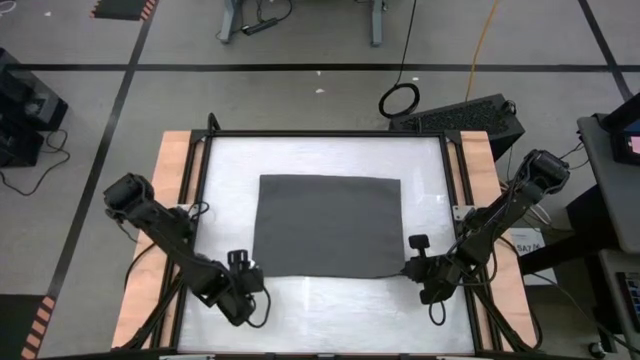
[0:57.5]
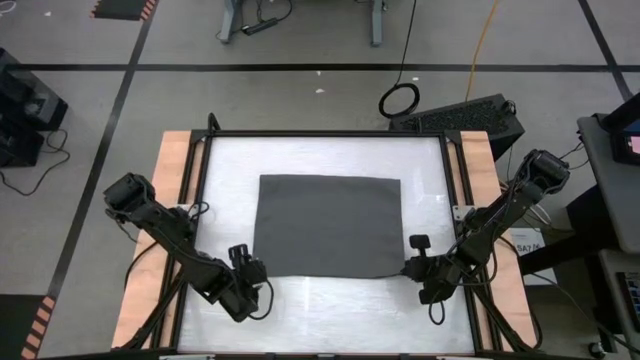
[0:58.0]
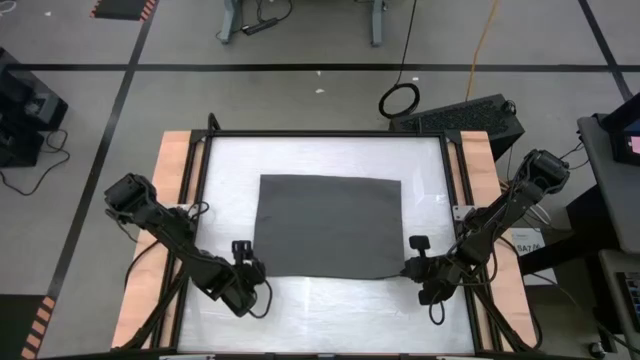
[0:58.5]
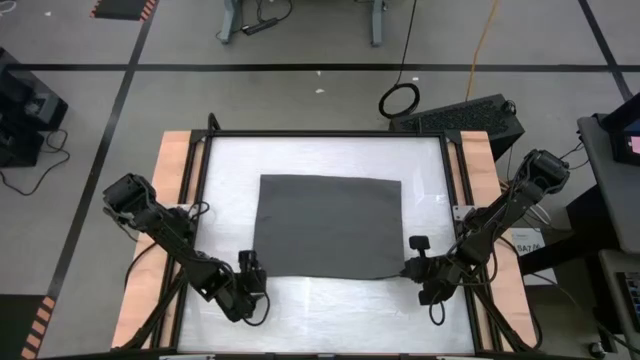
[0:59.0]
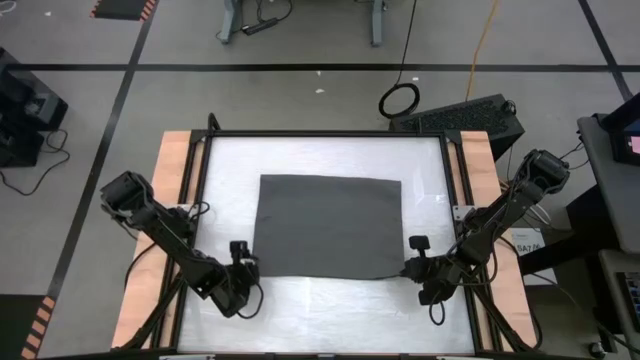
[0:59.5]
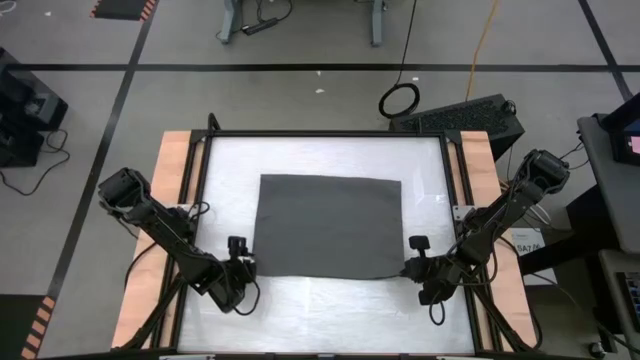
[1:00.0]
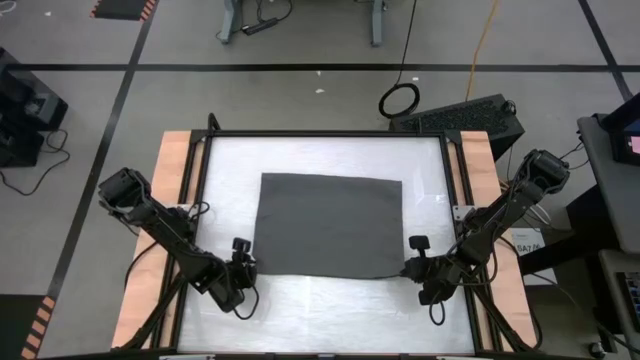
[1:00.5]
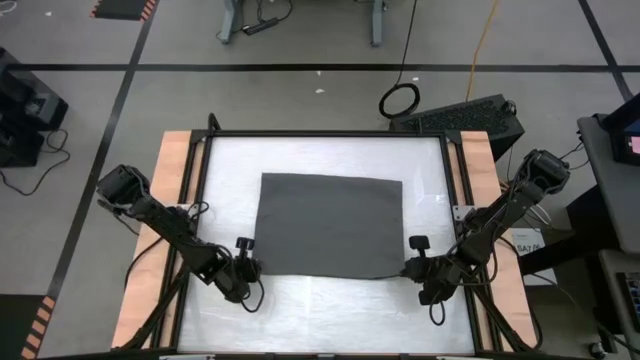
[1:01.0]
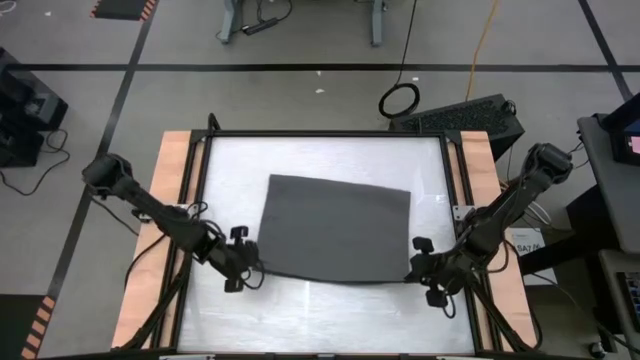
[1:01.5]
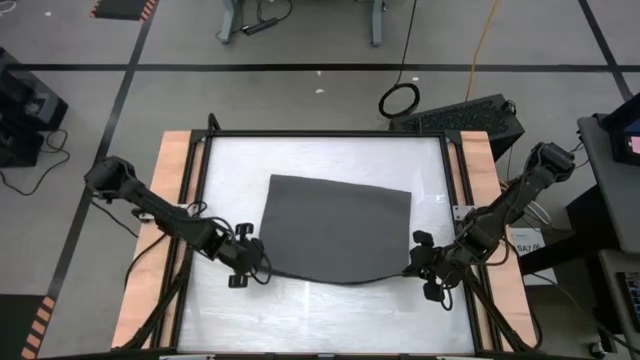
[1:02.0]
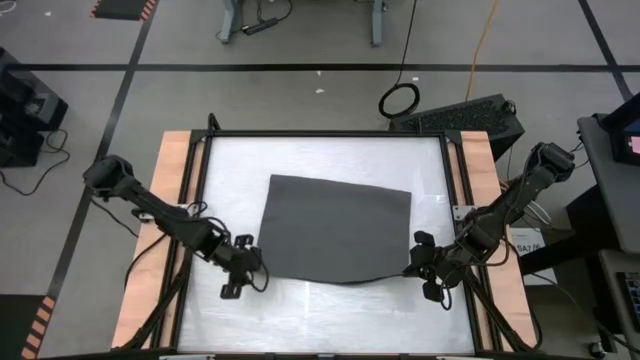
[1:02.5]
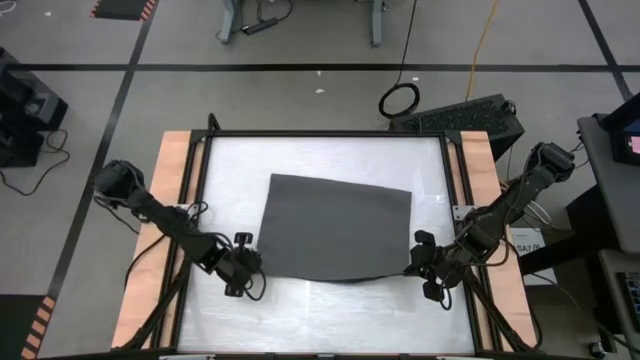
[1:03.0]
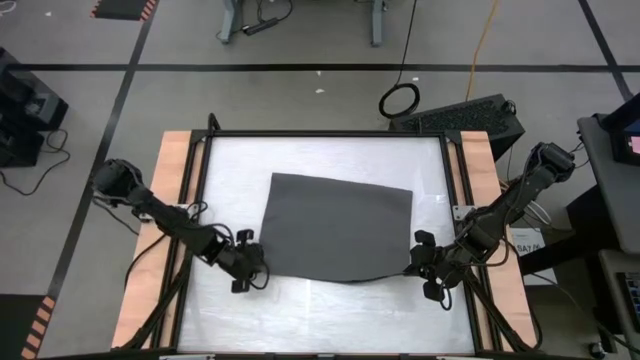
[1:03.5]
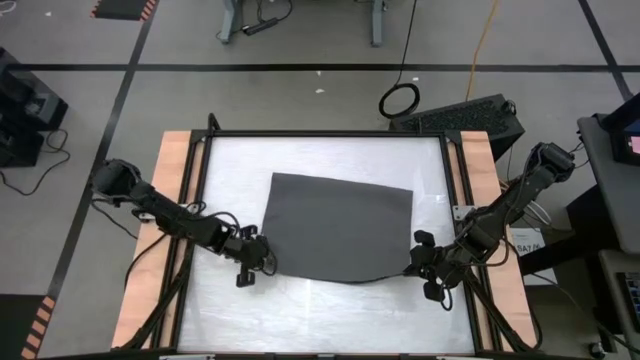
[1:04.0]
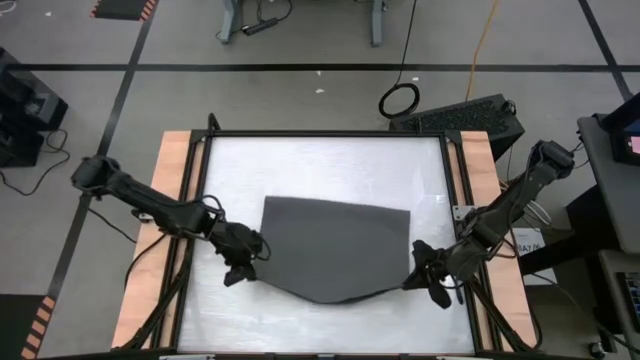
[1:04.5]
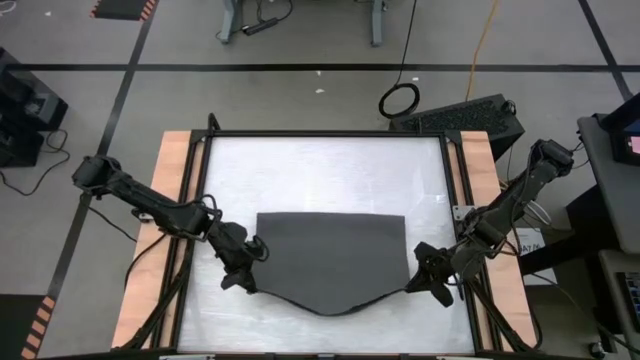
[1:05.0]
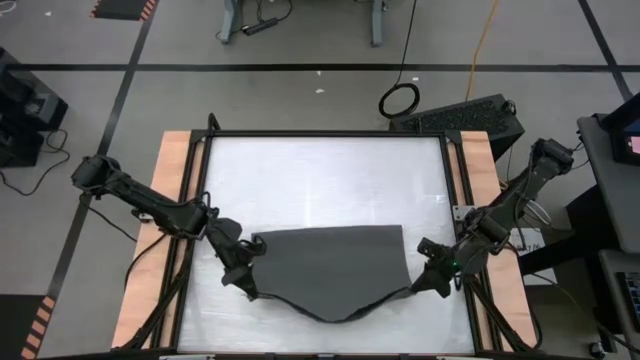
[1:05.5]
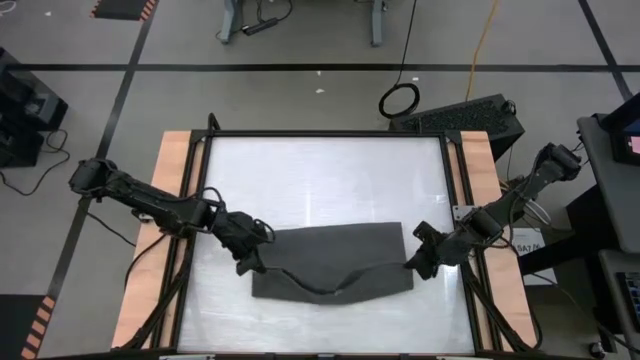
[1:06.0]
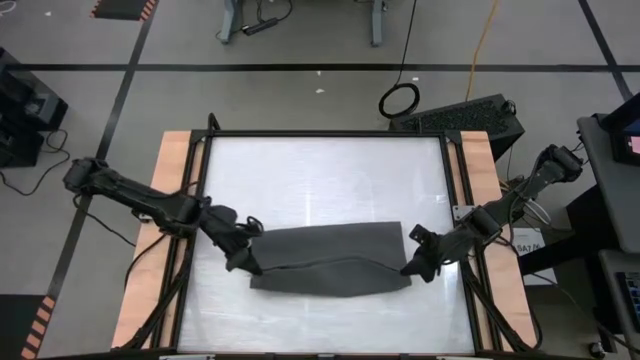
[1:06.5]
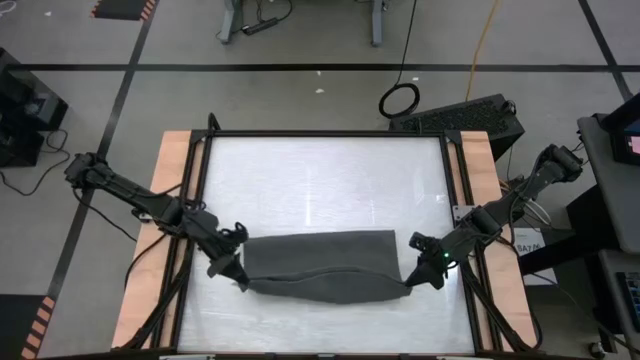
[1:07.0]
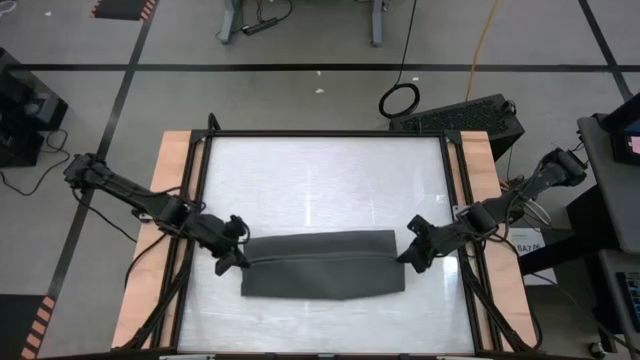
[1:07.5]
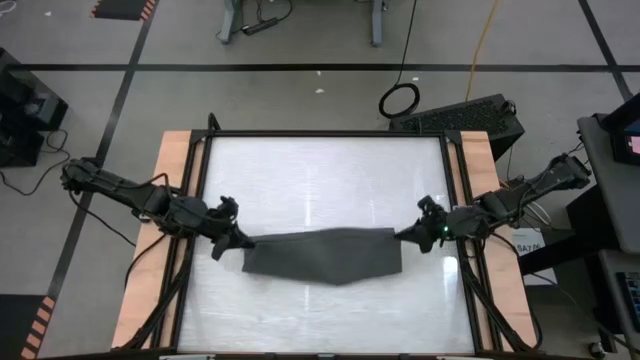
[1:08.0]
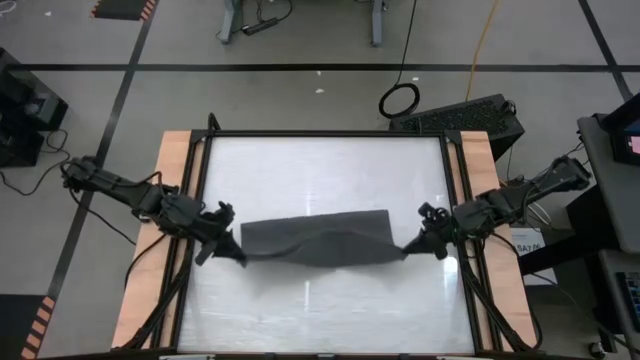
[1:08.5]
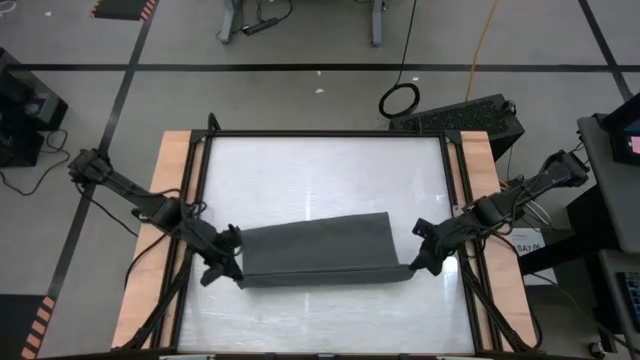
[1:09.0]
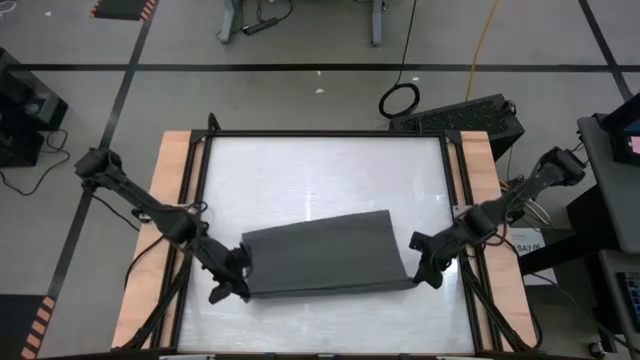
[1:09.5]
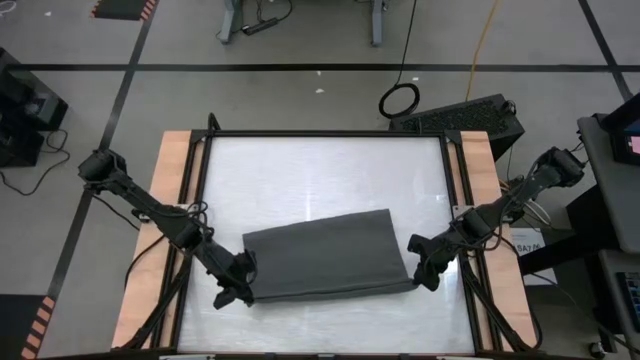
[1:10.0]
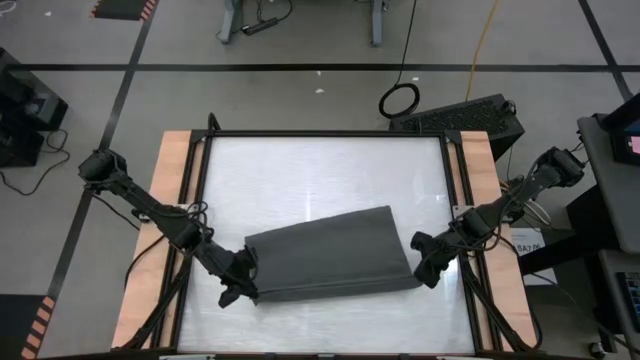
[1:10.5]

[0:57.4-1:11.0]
Task: Roll towel
Roll the gray towel

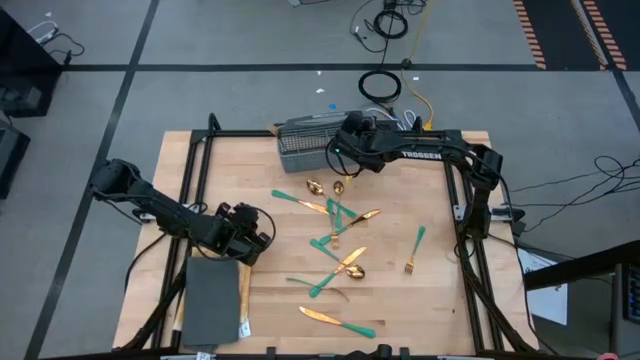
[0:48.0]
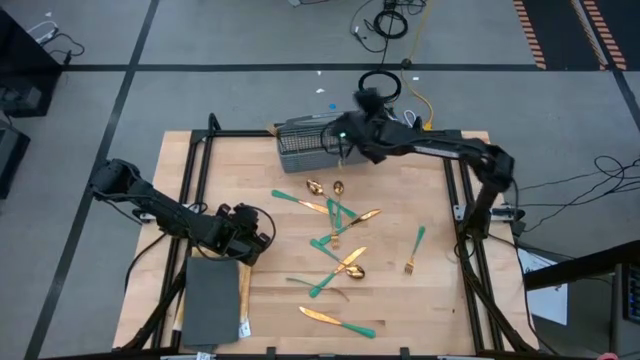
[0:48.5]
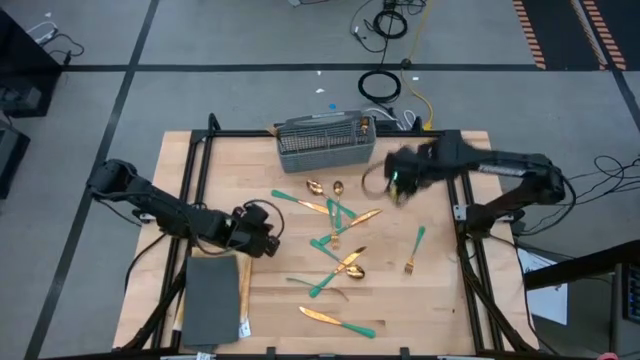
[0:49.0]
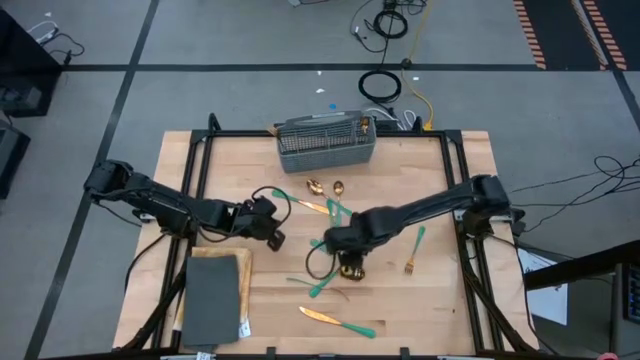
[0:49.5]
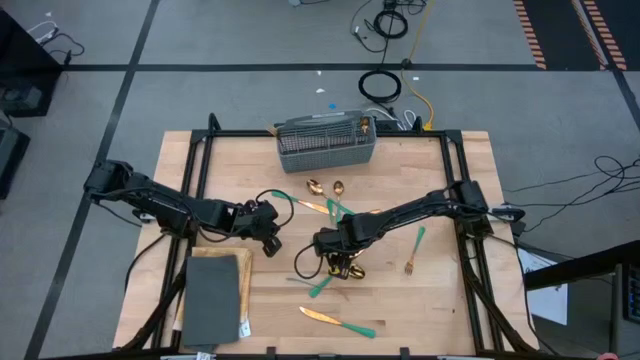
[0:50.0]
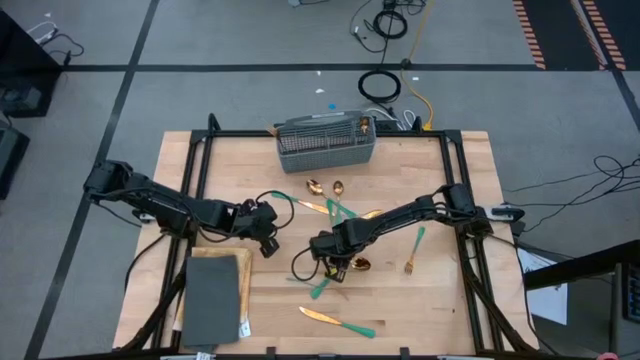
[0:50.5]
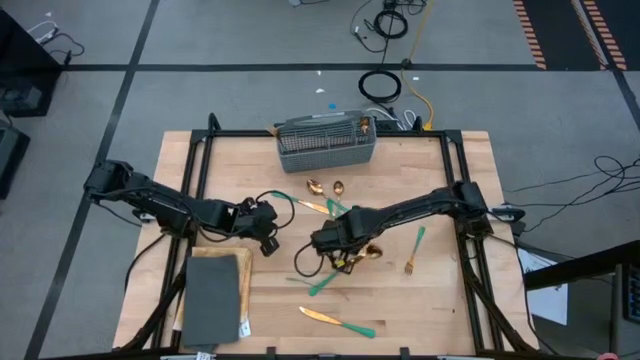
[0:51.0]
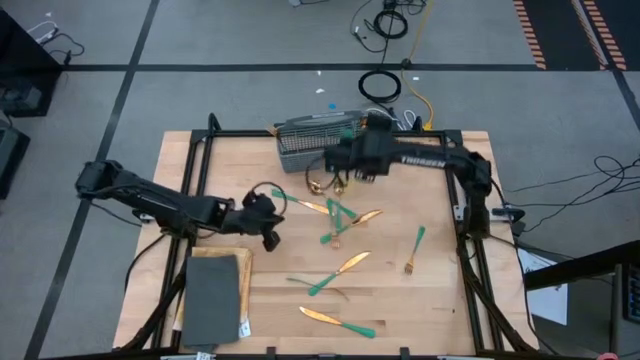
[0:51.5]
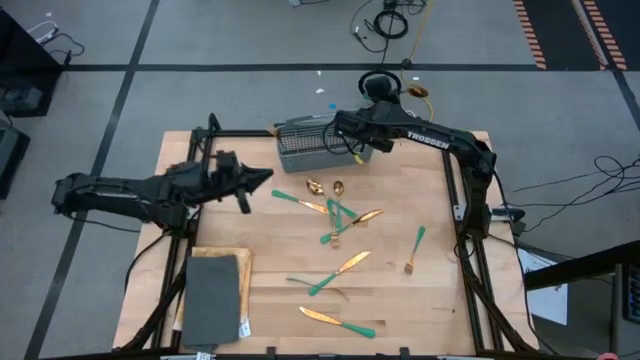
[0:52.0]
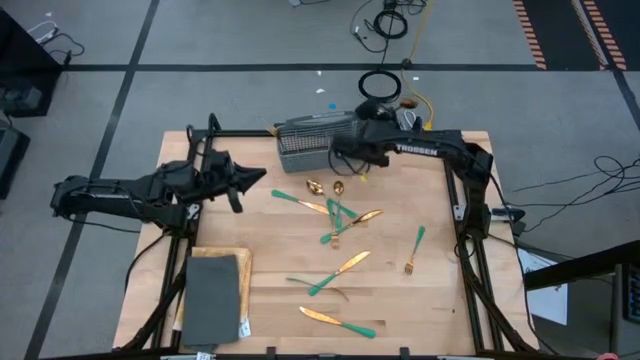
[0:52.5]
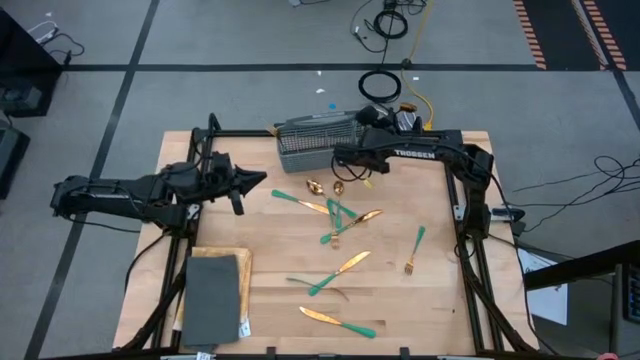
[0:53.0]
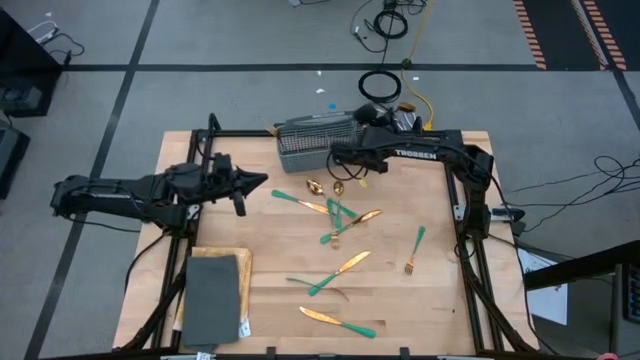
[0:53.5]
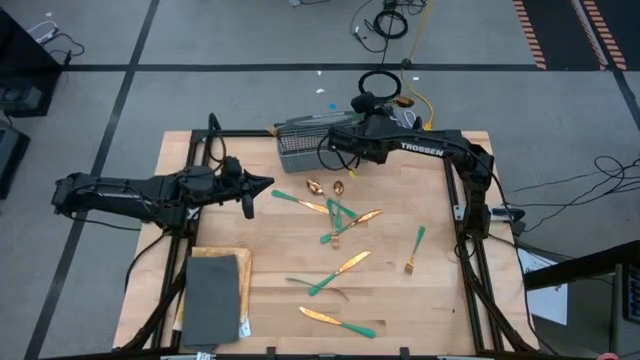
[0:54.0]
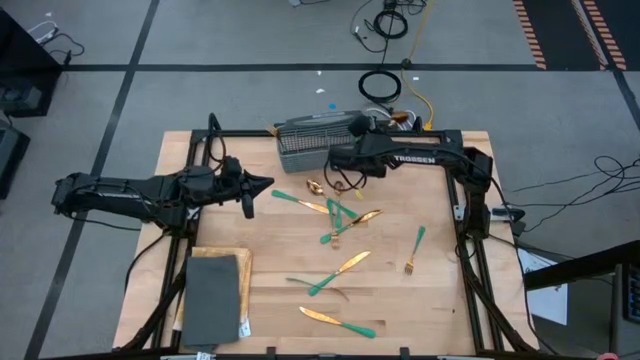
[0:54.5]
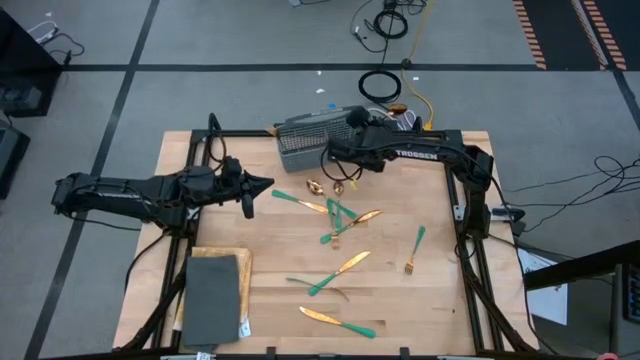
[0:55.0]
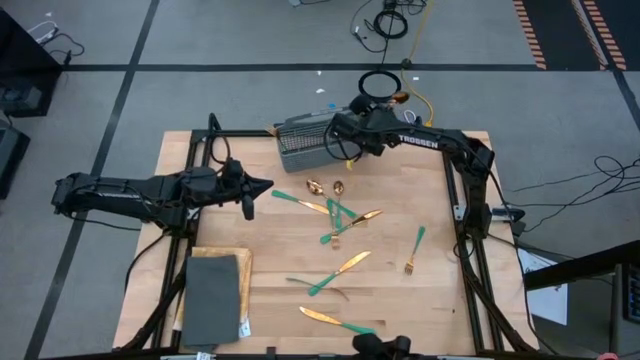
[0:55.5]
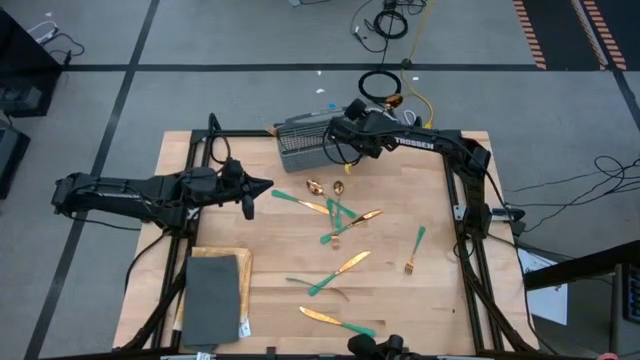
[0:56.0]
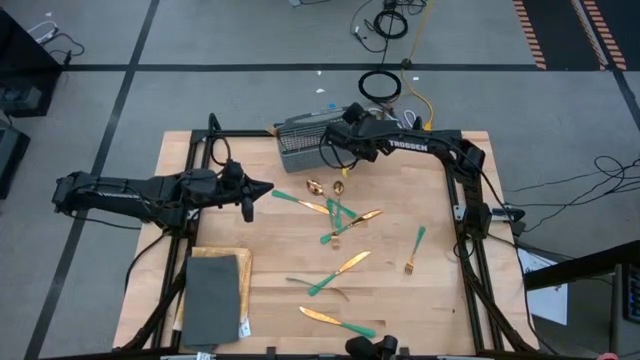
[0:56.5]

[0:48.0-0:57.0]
Task: Sort silverware
Put the green spoon into the silverware basket
